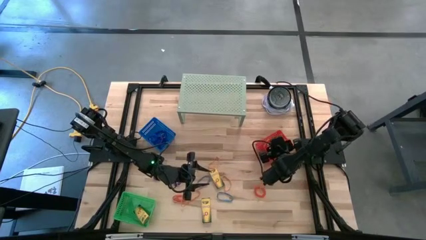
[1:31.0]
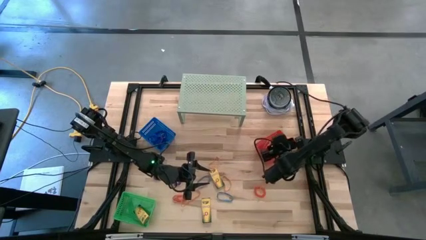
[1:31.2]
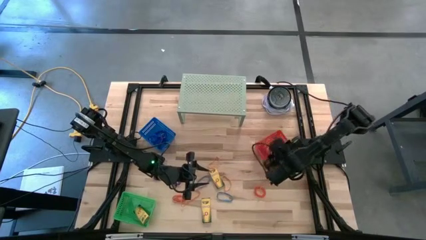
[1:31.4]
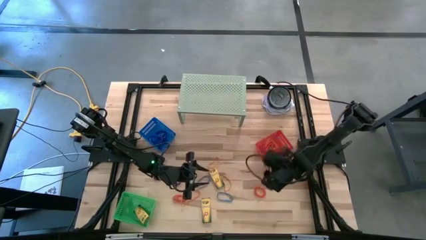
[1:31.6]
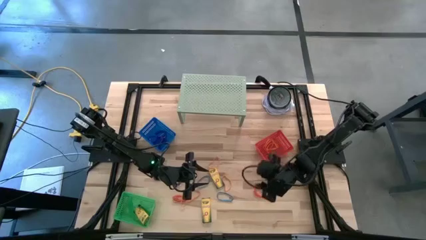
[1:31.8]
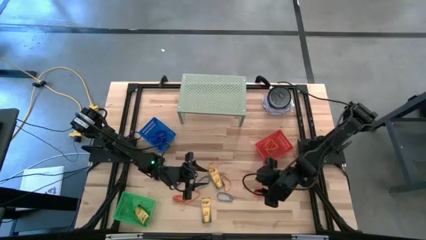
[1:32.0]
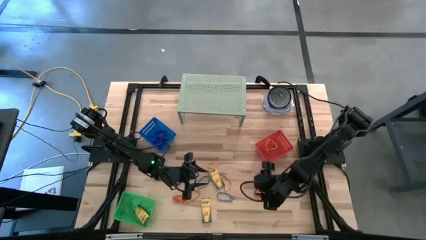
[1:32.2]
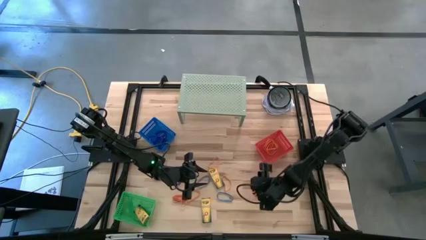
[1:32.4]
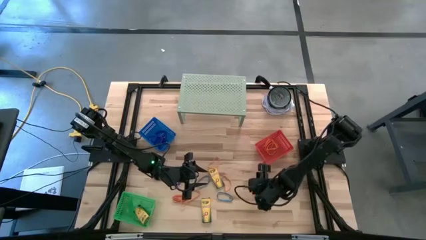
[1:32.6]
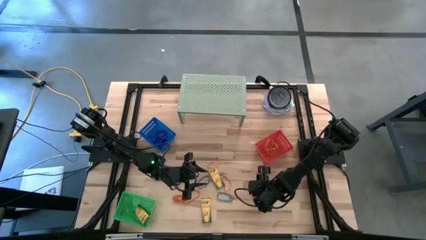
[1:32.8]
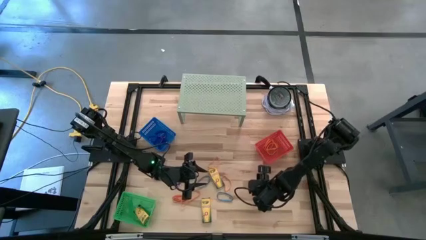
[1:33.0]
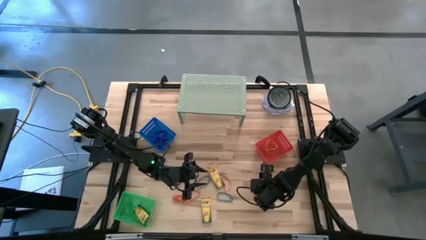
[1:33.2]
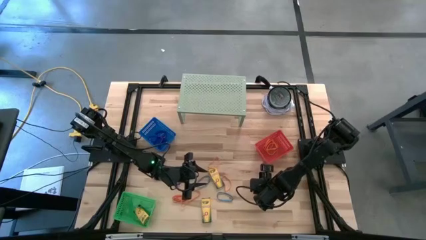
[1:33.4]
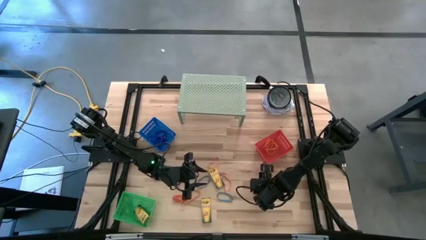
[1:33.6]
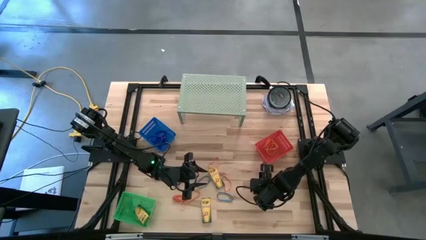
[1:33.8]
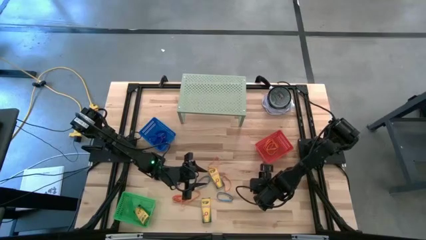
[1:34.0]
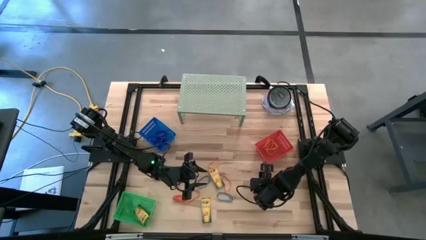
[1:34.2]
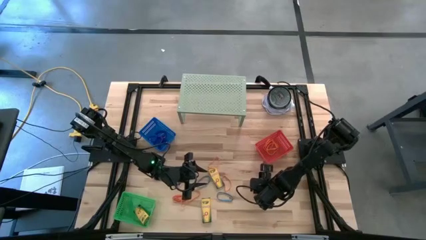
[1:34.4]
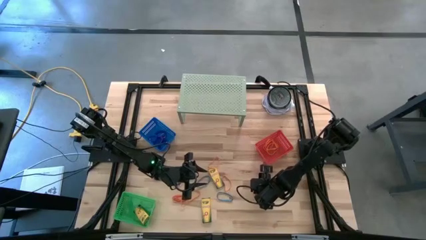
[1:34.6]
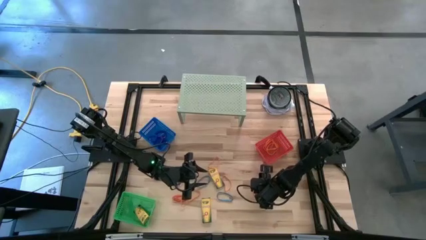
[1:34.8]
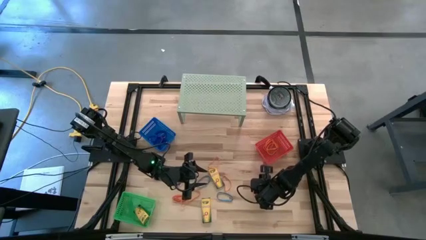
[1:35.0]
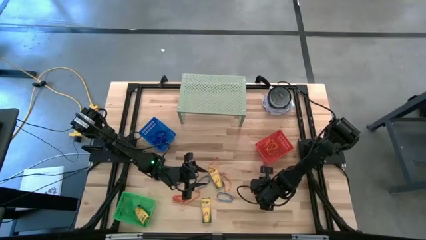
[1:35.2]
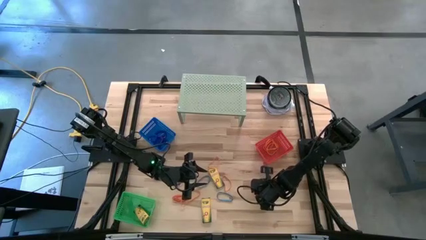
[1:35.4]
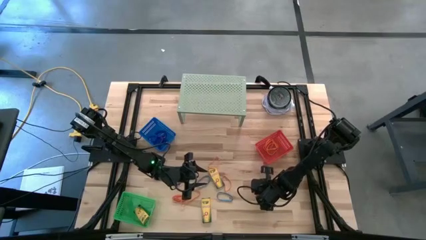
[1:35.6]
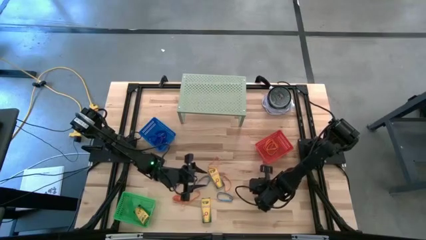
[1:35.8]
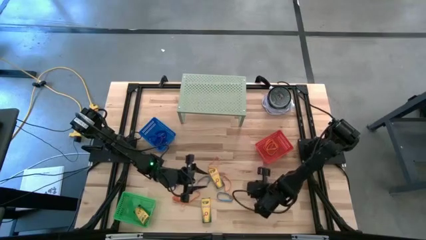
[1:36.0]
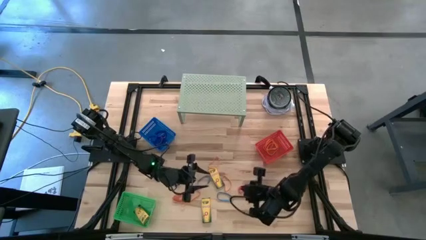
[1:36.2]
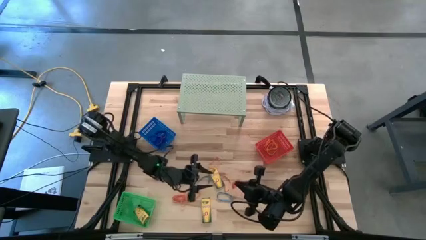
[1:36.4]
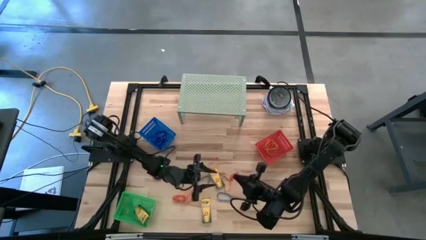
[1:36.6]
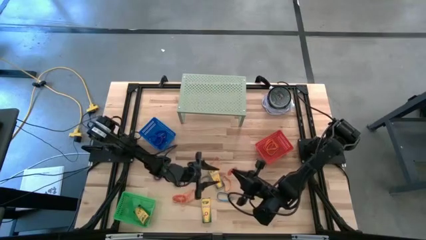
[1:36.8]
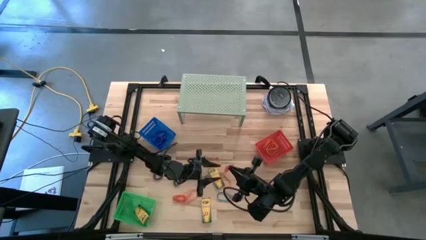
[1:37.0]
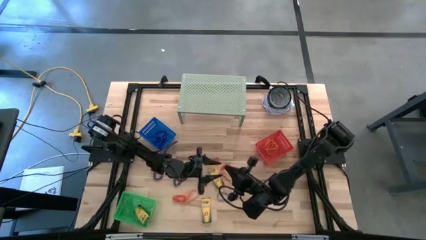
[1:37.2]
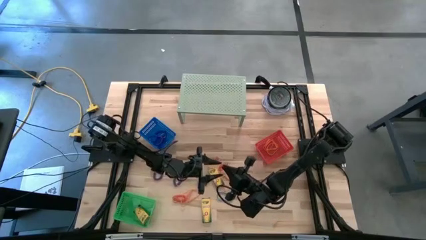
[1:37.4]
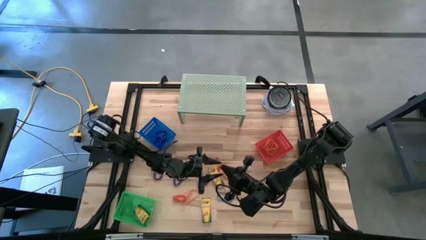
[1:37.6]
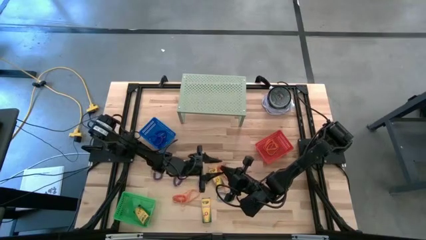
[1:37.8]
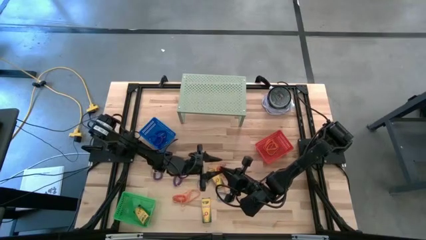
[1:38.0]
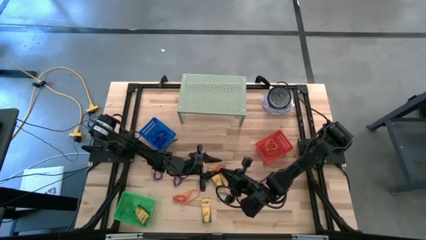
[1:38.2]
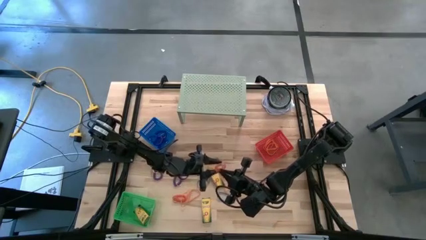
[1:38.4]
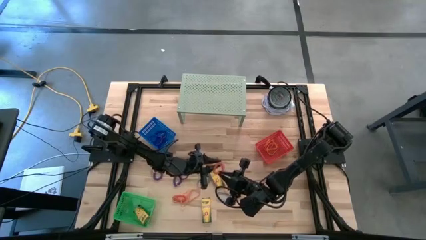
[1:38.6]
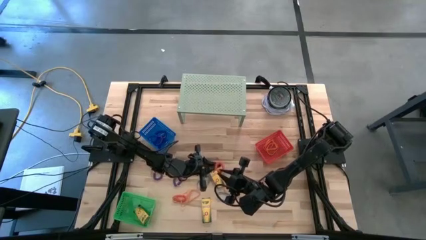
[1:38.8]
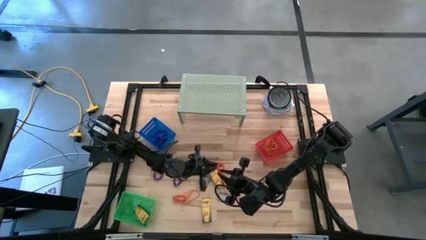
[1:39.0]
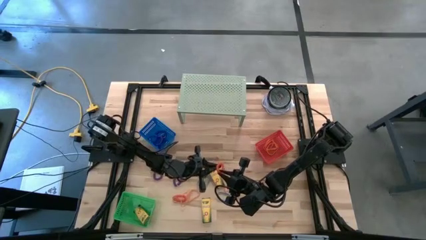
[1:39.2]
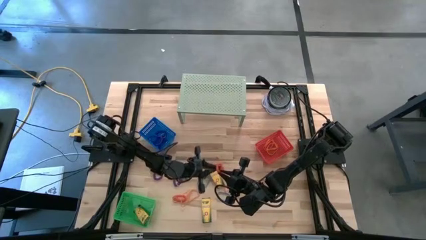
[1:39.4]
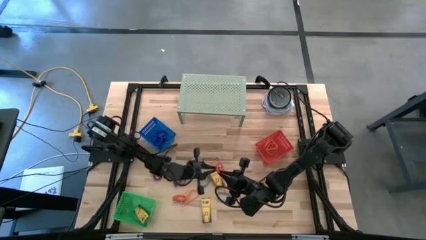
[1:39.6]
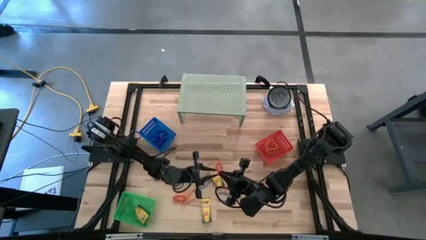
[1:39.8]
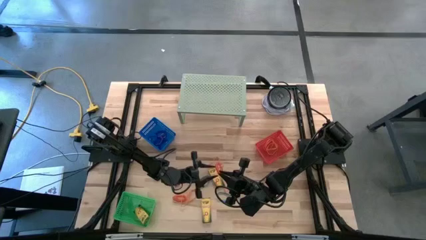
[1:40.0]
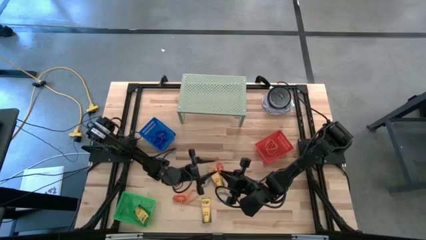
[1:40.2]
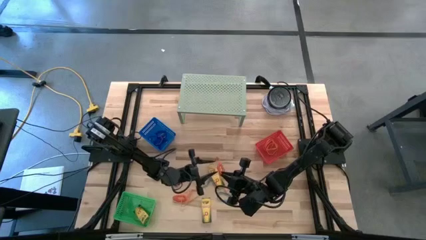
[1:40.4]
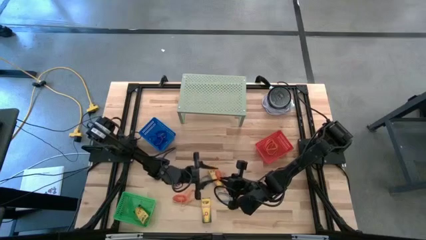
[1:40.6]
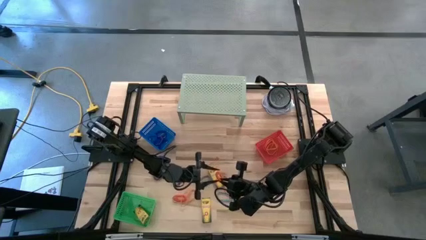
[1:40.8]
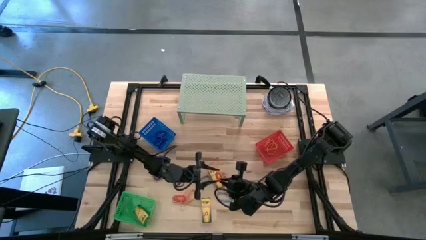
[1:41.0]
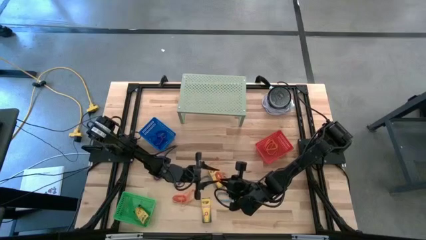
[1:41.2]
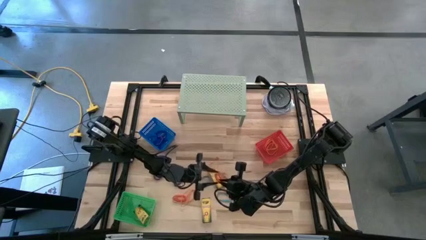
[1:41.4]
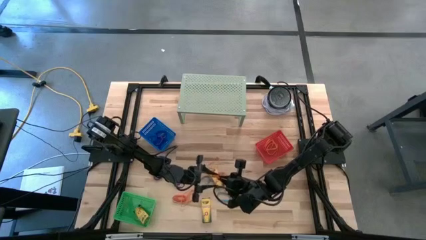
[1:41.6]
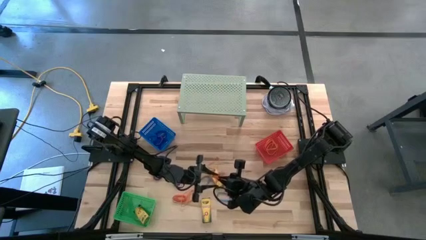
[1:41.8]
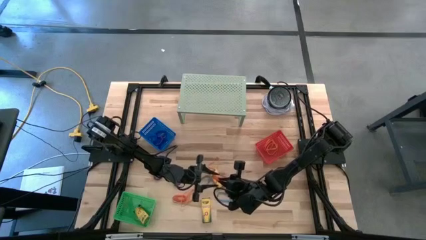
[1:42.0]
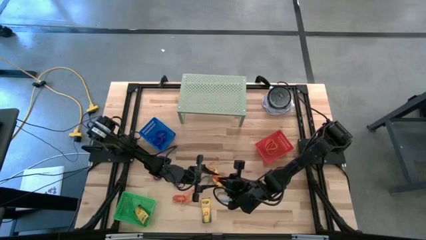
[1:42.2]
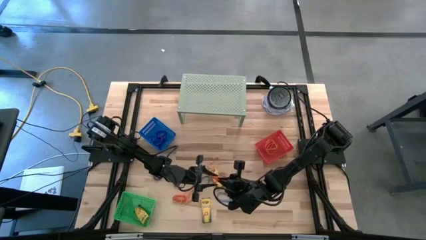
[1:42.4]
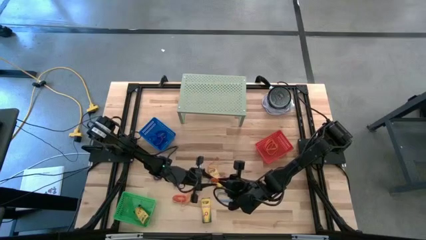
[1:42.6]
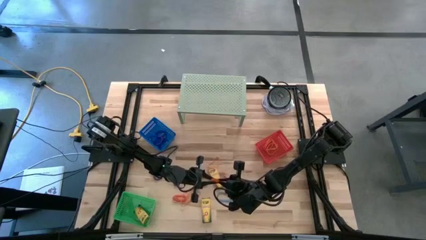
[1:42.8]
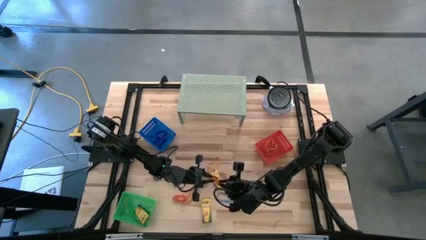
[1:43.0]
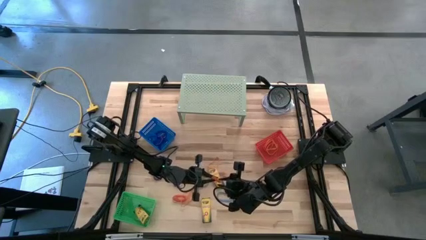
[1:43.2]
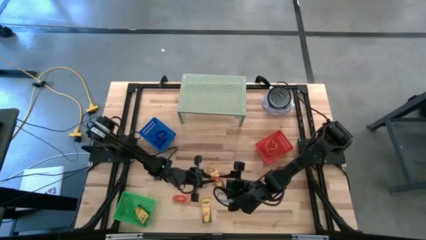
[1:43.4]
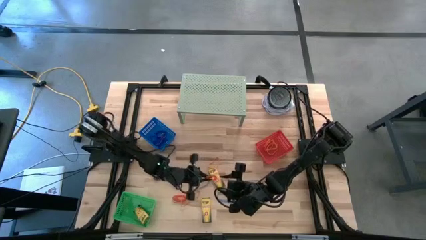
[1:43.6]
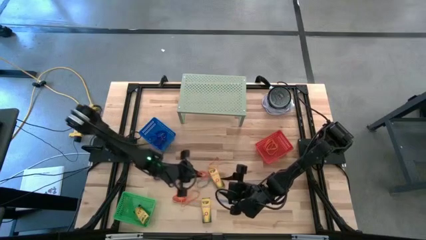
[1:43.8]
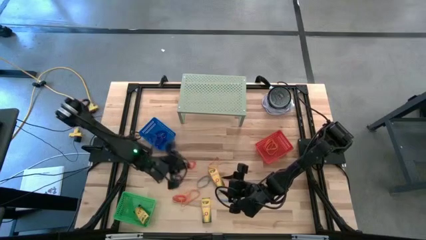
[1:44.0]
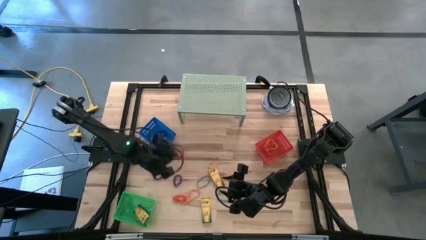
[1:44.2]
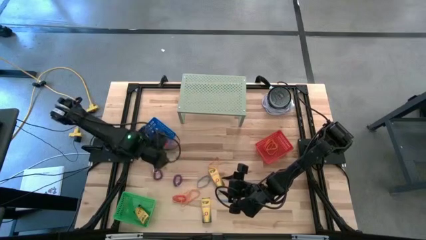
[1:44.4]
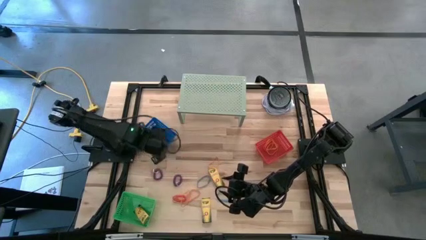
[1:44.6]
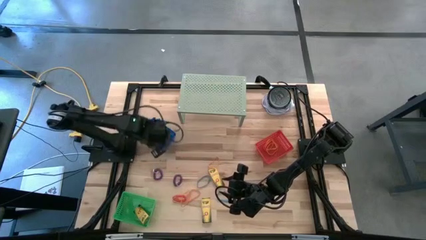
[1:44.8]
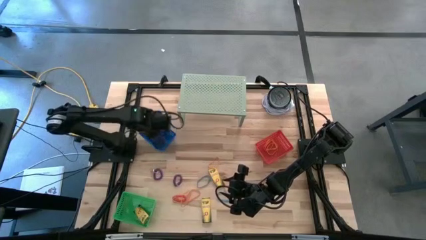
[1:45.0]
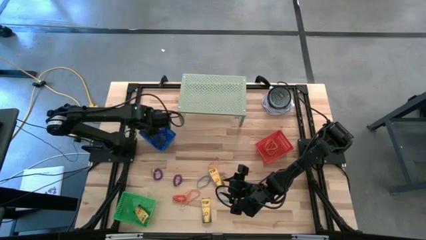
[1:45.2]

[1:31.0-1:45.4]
Task: Pick & Place Office Desk Supplies
Put the orange spring keychain into the blue bin

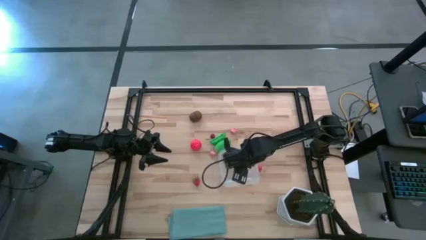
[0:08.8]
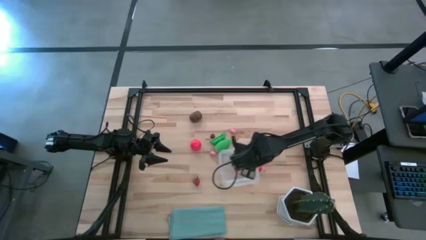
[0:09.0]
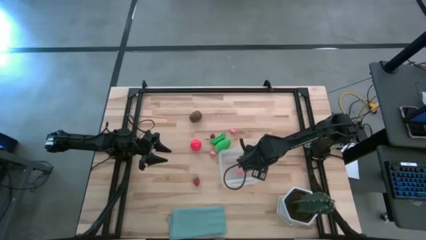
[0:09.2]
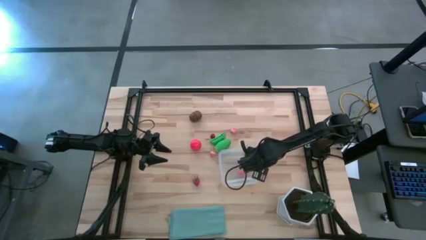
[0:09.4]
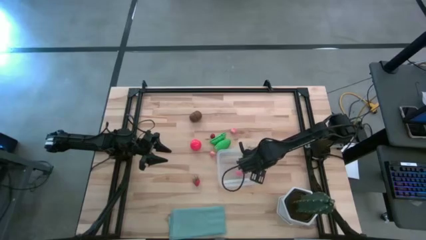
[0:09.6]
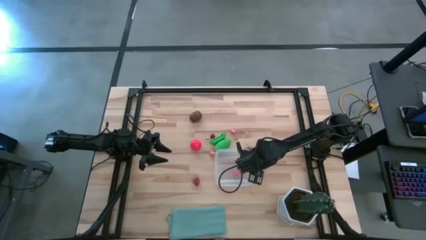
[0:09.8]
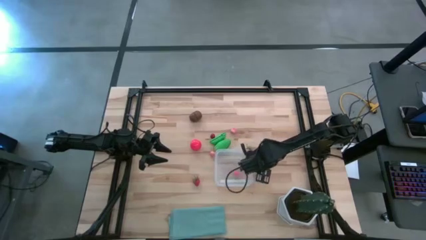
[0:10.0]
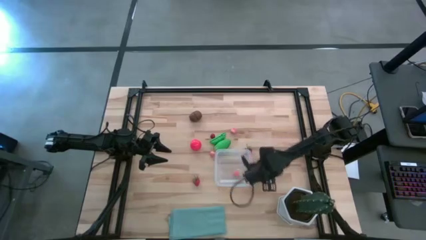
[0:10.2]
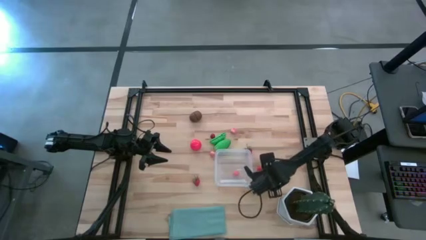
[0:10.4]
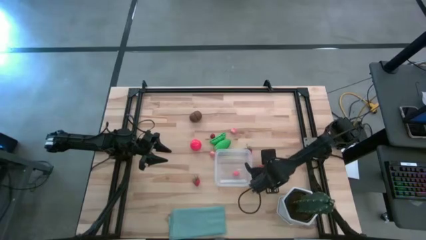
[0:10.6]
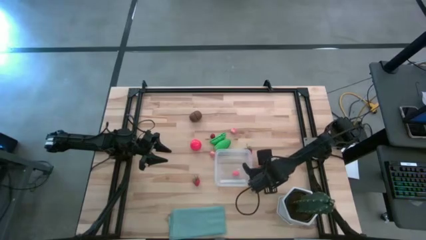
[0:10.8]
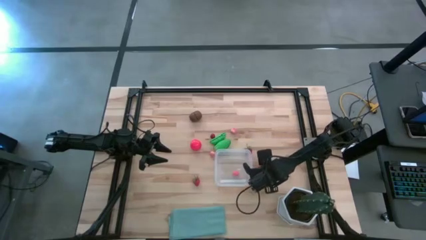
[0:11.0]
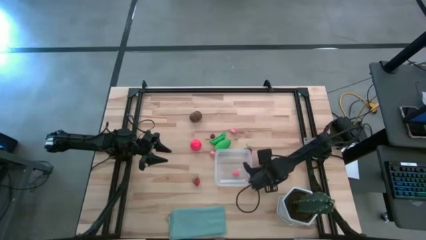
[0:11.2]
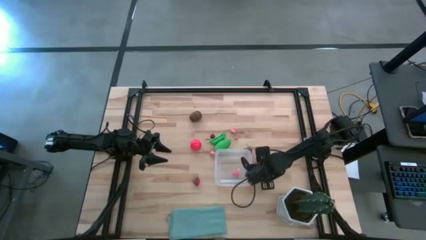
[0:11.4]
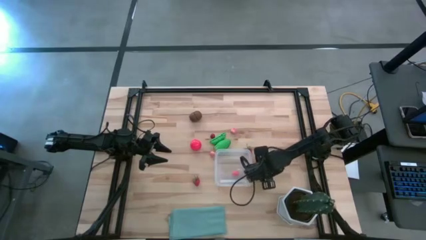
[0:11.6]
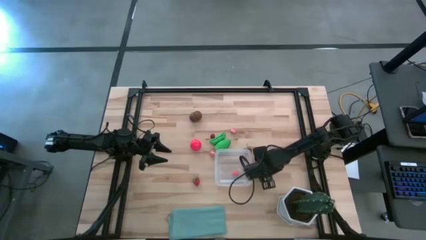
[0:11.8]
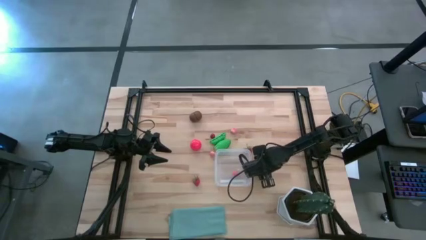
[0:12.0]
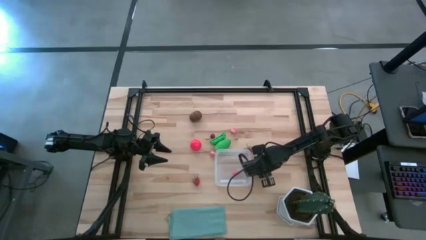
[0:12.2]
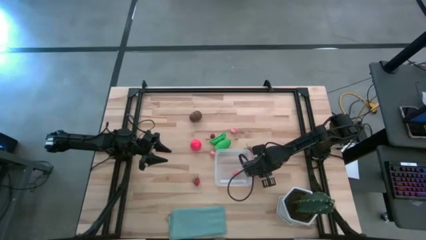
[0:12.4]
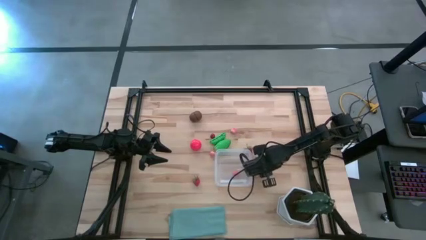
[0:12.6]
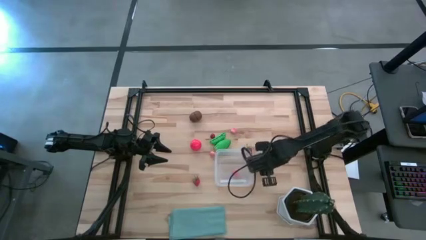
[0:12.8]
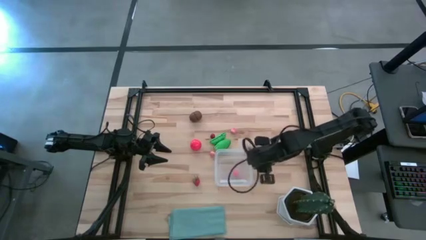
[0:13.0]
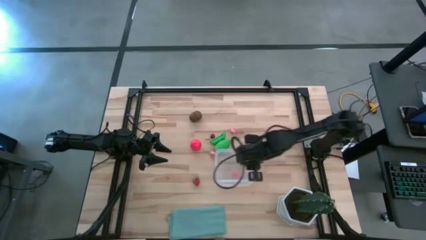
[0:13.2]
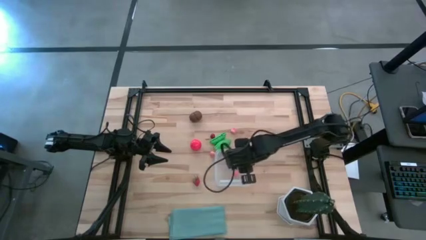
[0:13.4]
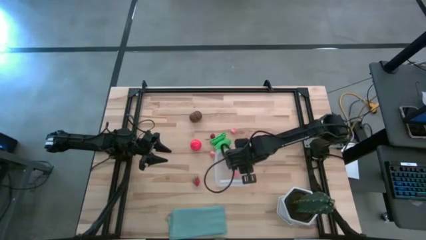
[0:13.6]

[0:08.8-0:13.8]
Task: Pick and placing Produce into tupperware
Put the bottom cherry into the transparent container
